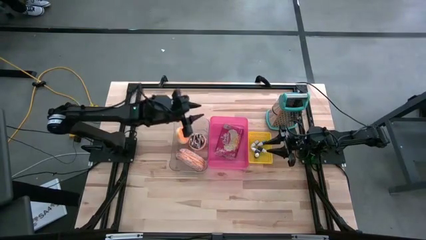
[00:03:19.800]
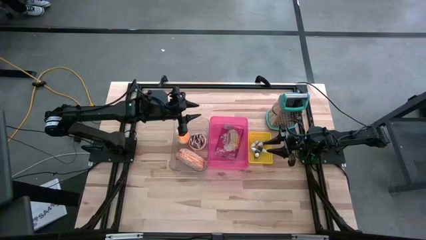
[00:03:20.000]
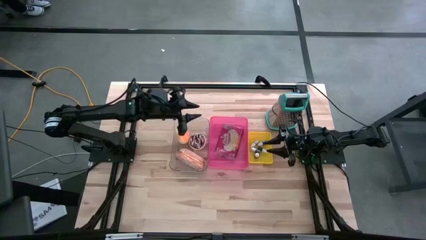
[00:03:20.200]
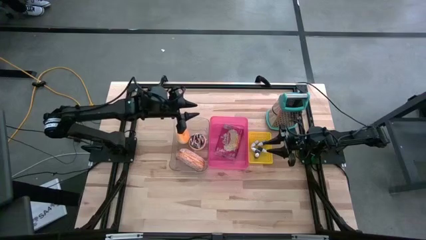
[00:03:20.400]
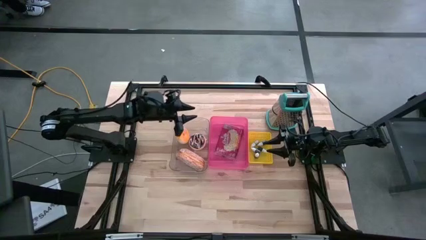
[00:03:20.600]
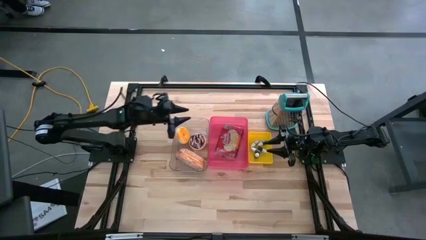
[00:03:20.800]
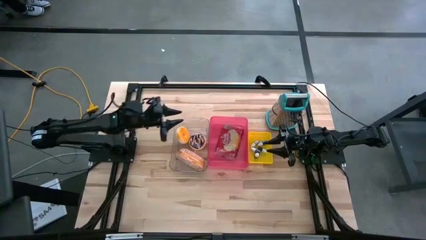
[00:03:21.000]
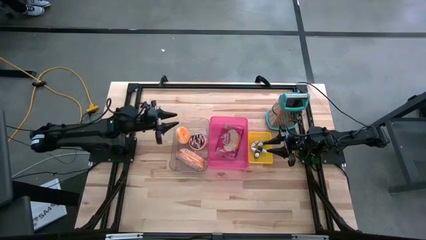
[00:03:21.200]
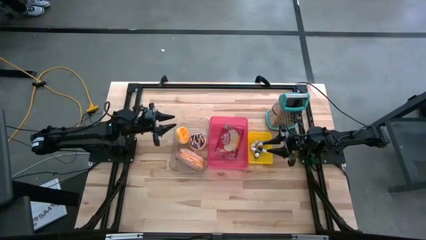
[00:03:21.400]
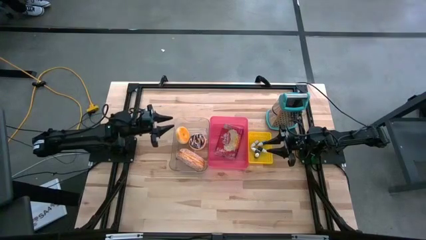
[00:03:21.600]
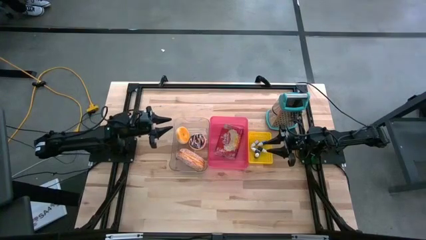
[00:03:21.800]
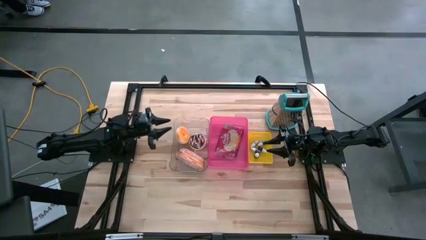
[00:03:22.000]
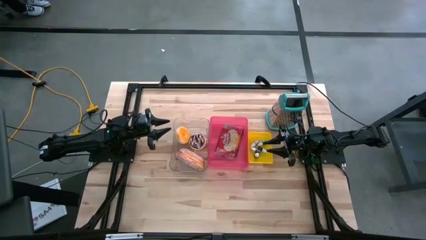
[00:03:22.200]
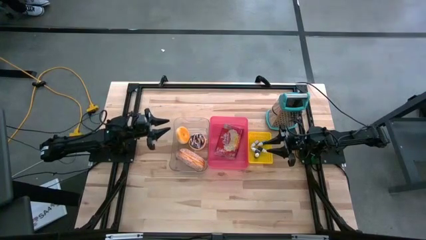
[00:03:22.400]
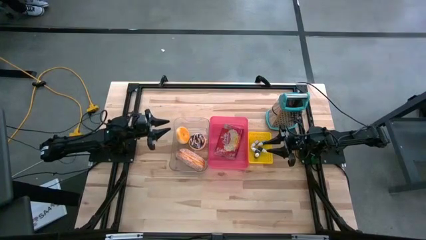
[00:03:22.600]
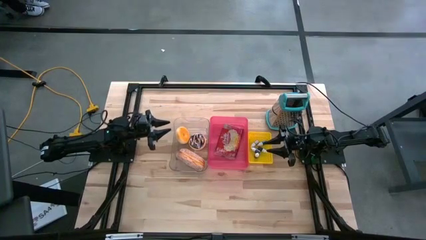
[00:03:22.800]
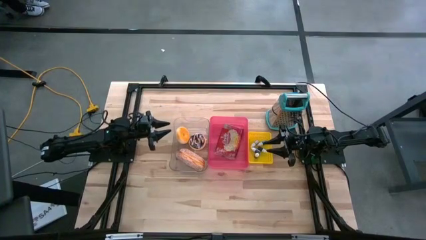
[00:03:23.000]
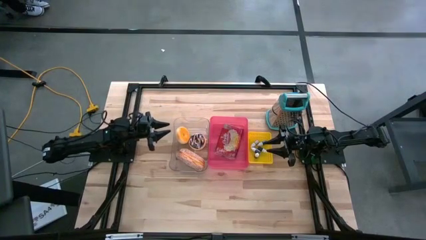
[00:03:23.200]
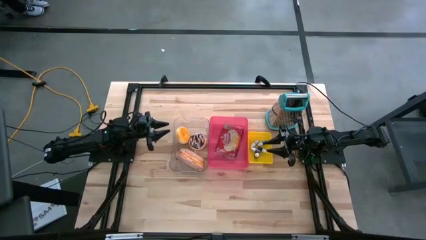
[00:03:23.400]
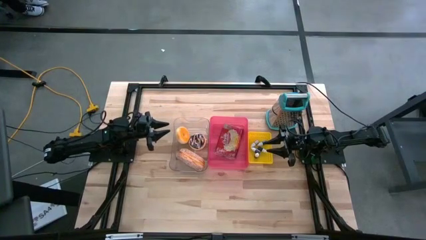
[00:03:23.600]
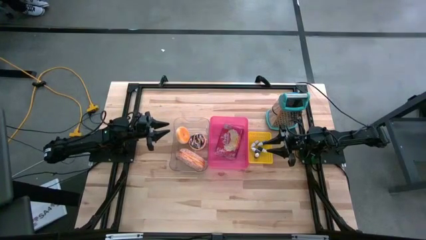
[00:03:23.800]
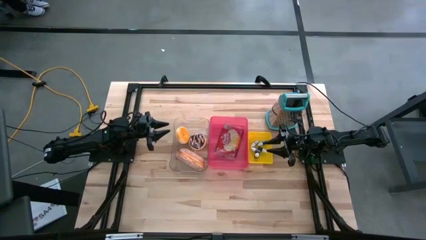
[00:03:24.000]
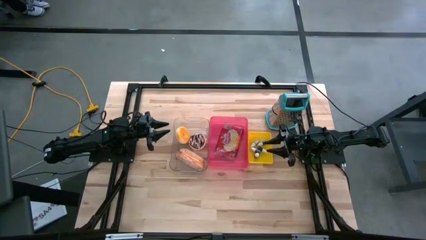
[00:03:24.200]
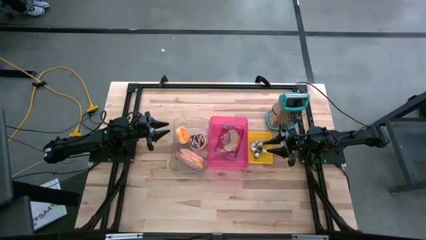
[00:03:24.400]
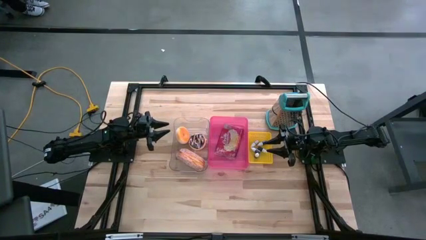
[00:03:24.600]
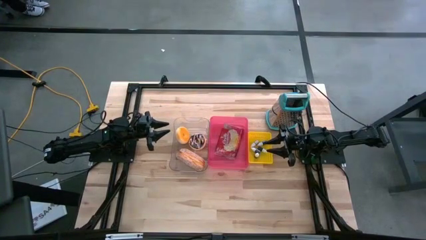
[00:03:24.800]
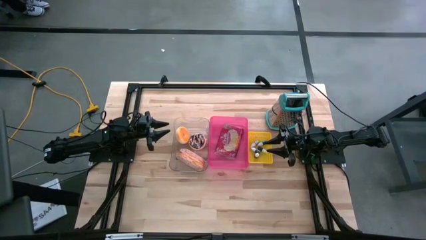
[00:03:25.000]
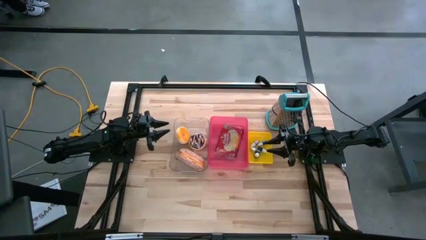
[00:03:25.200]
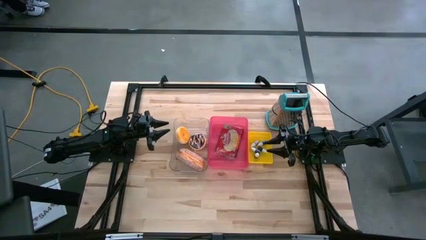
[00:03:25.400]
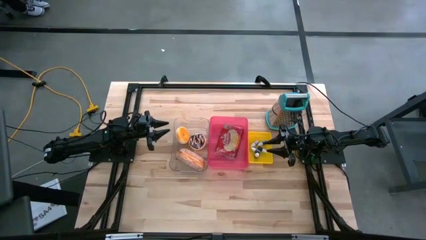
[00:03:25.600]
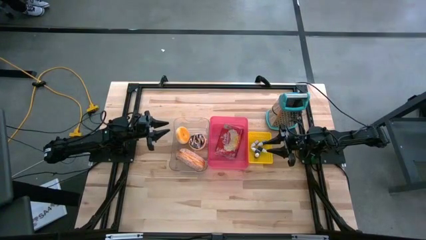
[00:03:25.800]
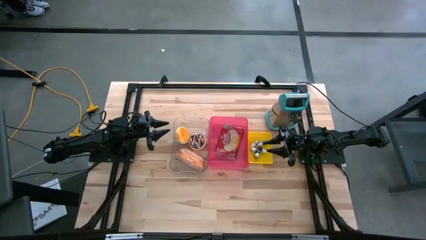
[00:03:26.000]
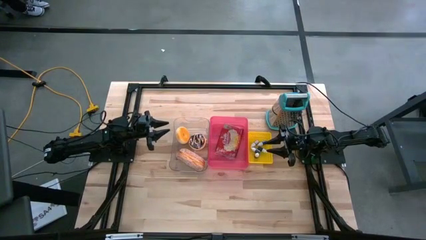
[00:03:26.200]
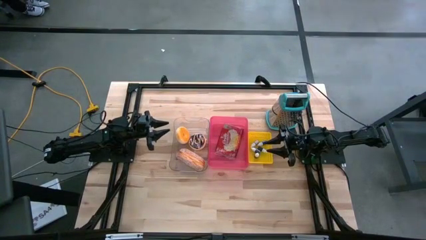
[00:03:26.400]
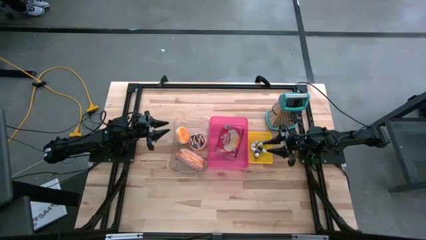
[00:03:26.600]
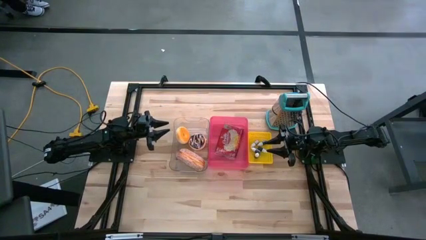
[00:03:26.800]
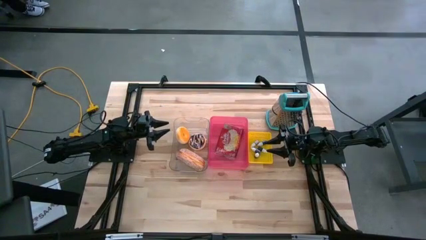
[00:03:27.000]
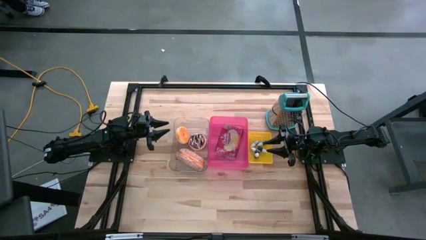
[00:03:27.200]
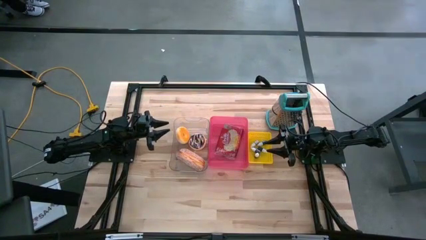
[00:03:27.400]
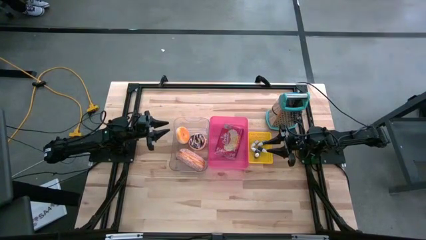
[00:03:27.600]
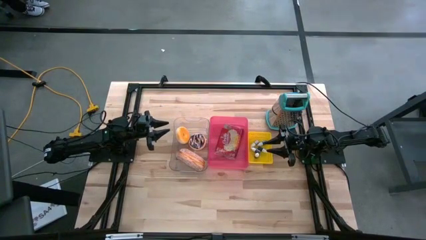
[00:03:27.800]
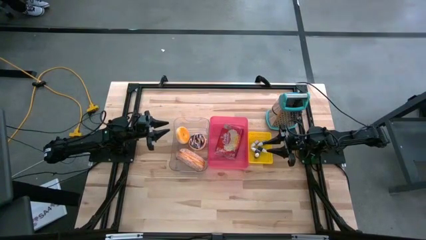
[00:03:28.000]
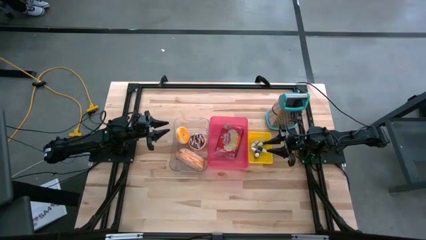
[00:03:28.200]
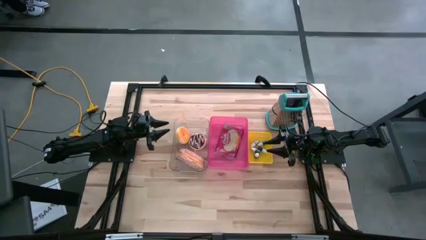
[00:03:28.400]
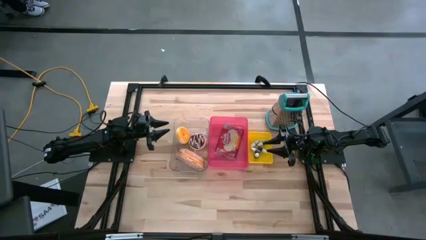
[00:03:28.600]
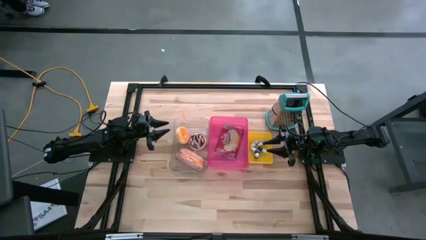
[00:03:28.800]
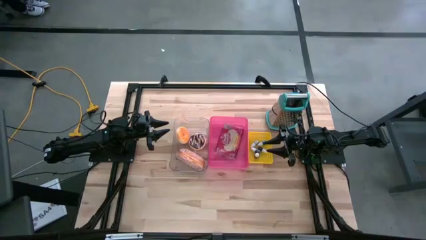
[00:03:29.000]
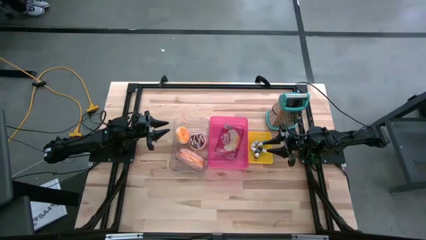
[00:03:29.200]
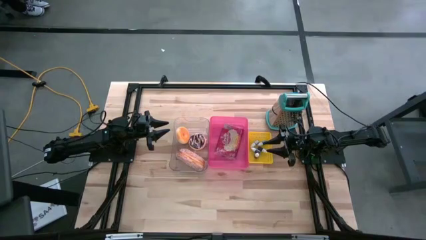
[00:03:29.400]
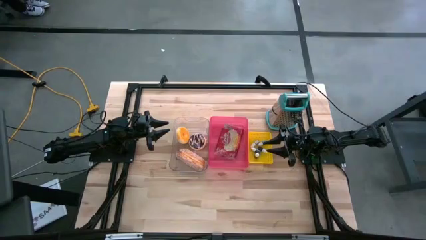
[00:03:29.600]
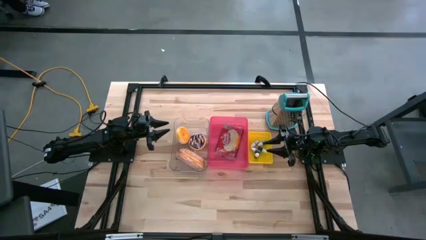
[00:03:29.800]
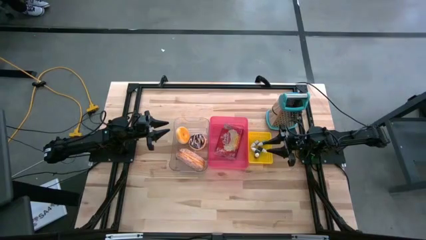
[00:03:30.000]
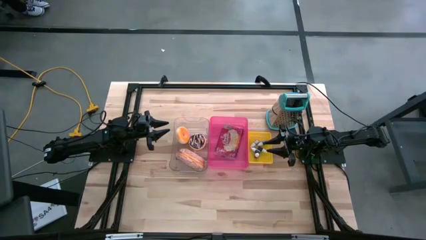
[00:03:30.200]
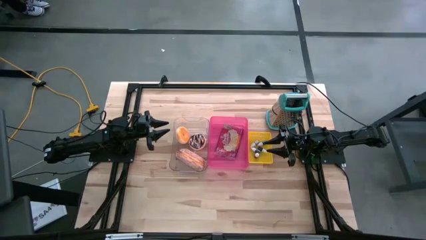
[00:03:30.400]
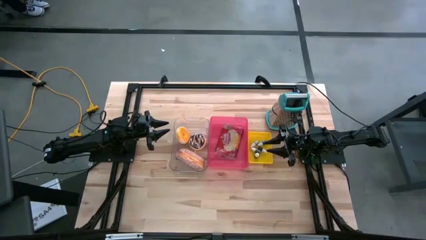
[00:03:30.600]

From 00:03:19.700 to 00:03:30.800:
Return to Home Position
